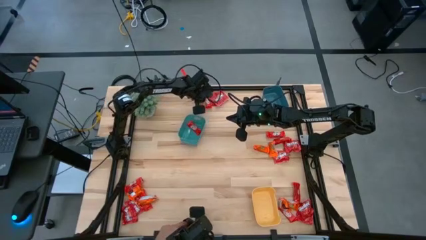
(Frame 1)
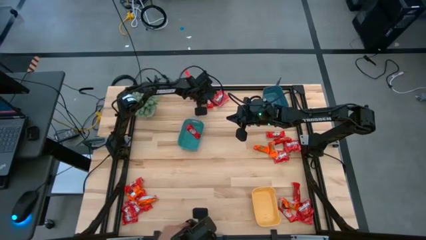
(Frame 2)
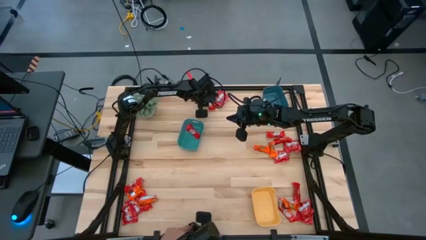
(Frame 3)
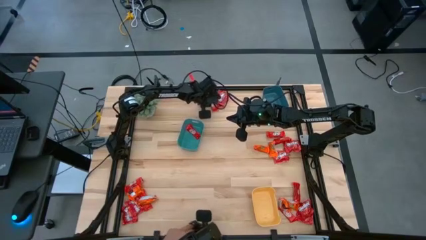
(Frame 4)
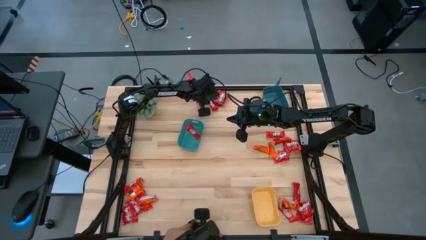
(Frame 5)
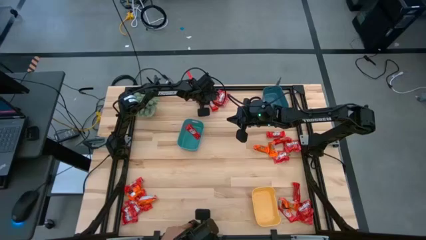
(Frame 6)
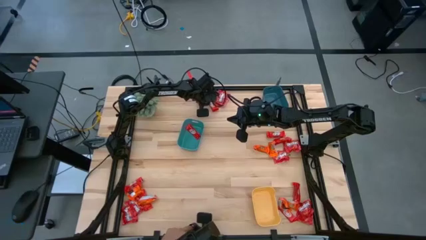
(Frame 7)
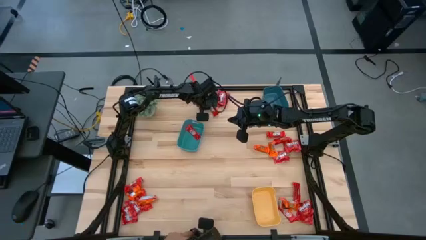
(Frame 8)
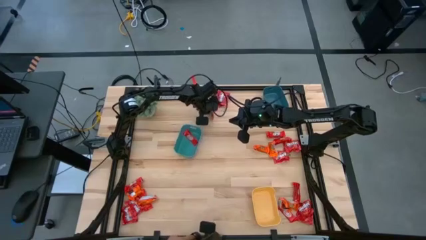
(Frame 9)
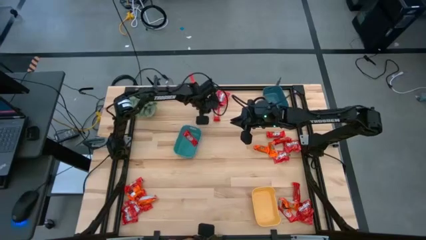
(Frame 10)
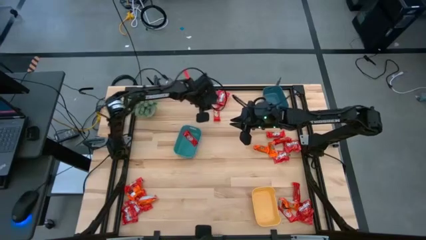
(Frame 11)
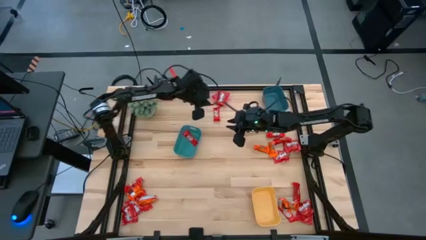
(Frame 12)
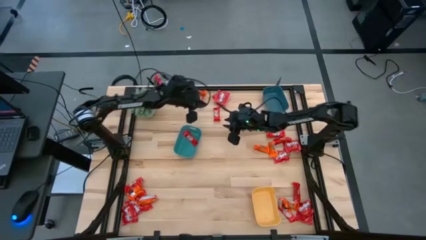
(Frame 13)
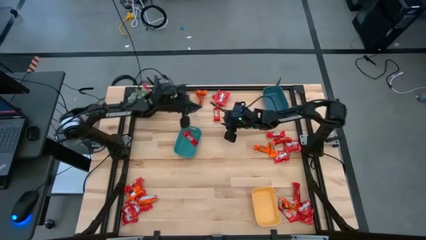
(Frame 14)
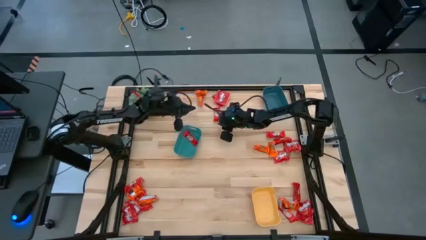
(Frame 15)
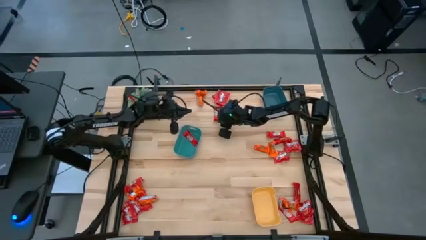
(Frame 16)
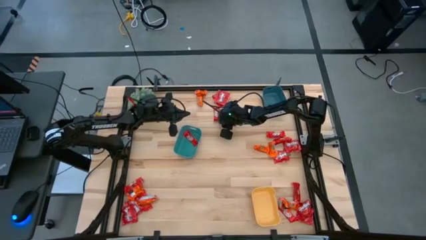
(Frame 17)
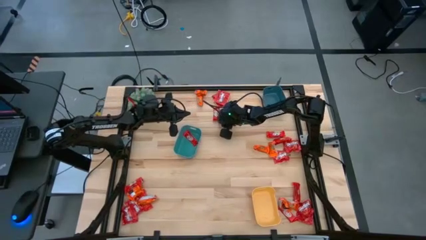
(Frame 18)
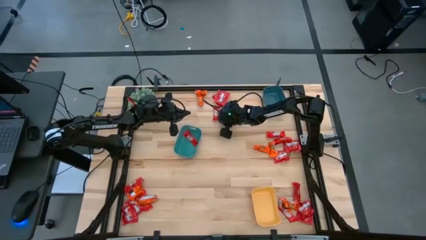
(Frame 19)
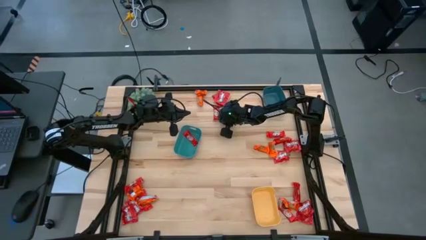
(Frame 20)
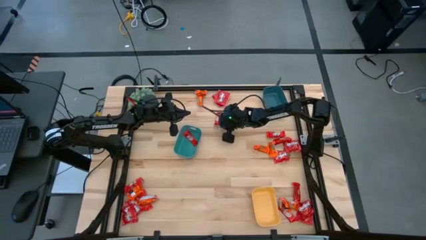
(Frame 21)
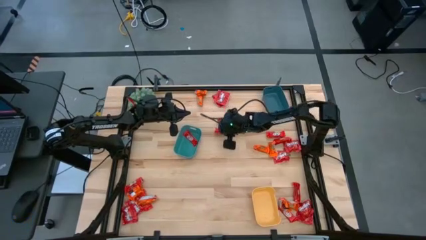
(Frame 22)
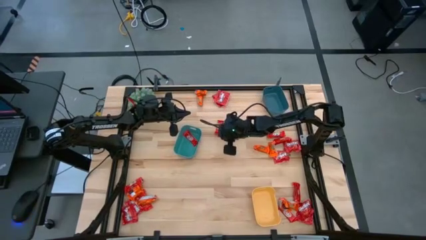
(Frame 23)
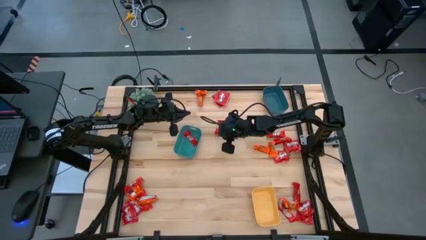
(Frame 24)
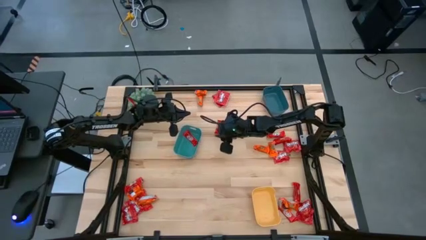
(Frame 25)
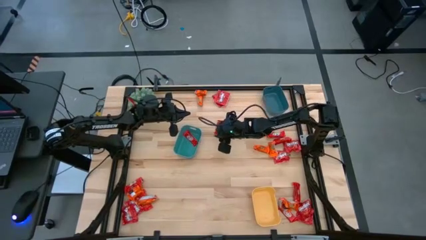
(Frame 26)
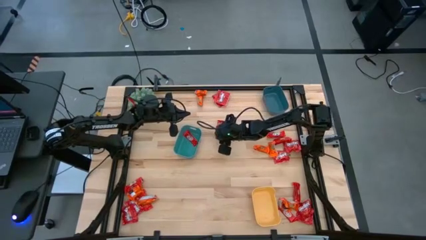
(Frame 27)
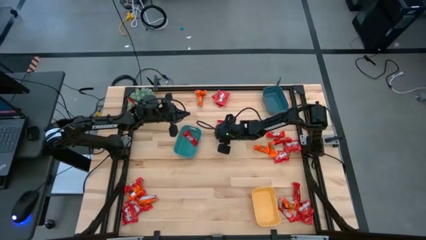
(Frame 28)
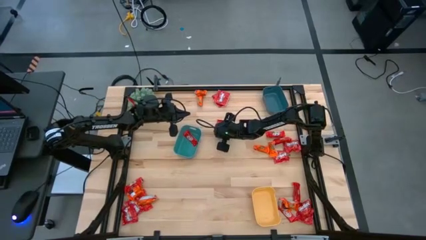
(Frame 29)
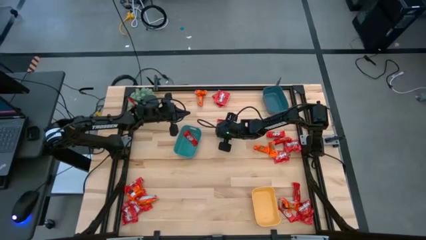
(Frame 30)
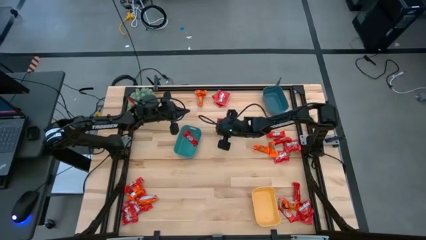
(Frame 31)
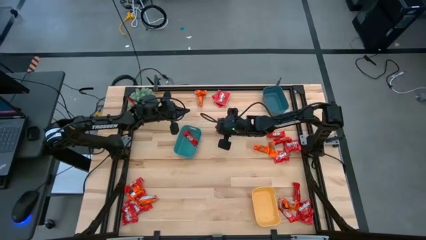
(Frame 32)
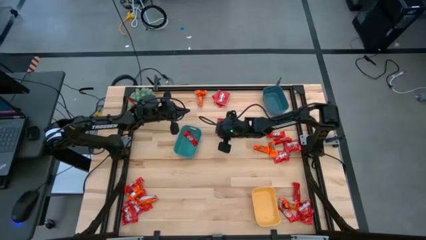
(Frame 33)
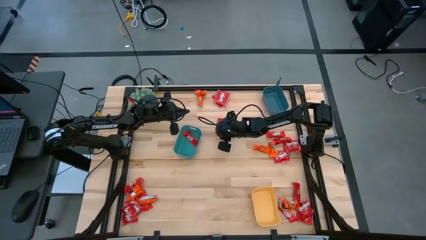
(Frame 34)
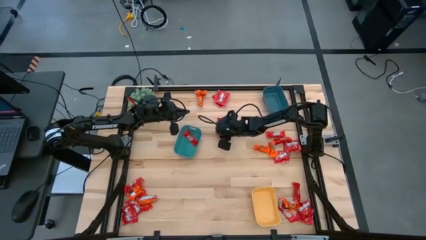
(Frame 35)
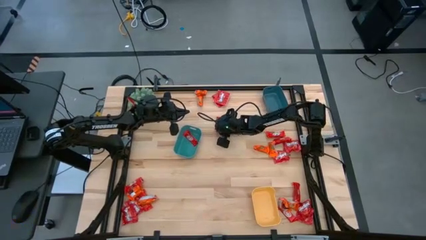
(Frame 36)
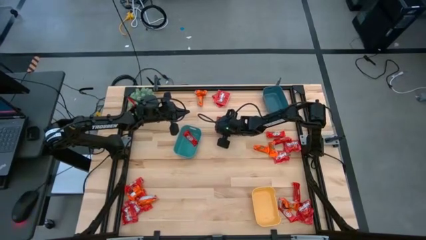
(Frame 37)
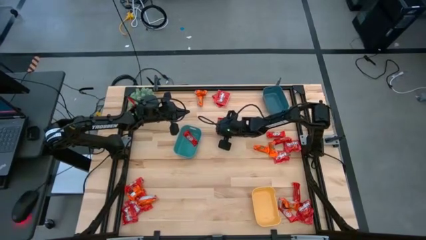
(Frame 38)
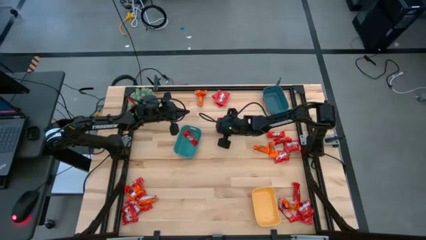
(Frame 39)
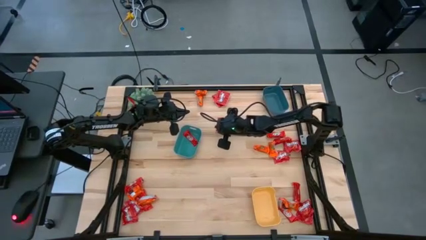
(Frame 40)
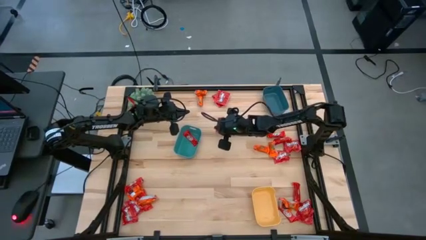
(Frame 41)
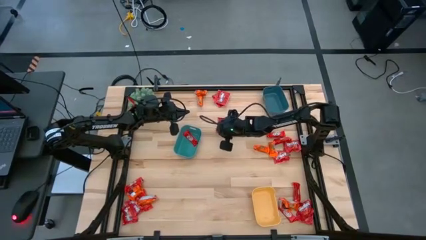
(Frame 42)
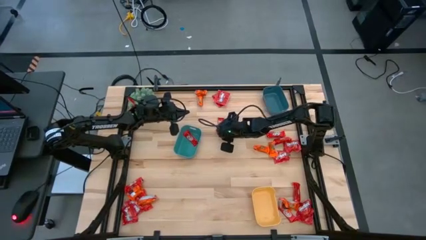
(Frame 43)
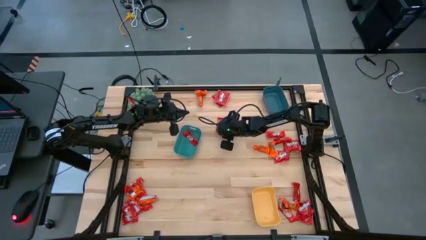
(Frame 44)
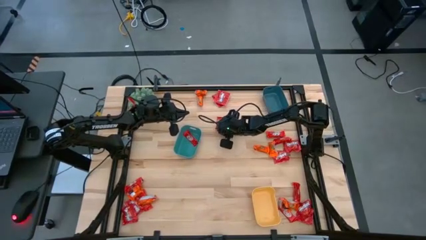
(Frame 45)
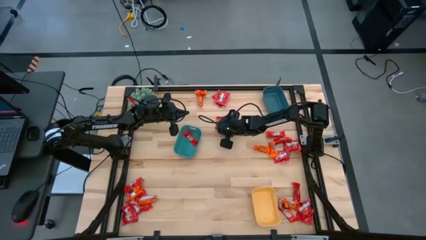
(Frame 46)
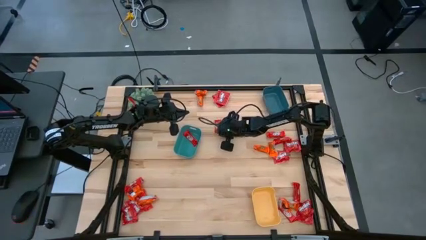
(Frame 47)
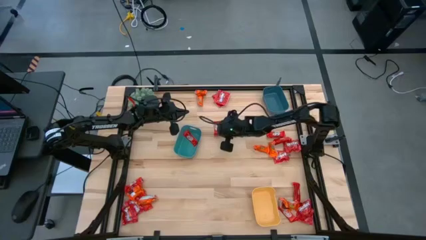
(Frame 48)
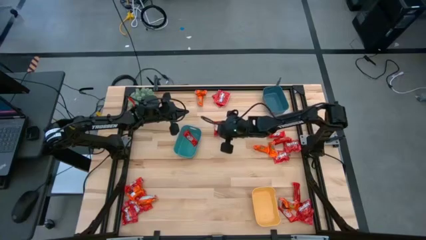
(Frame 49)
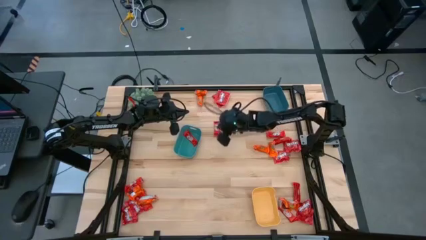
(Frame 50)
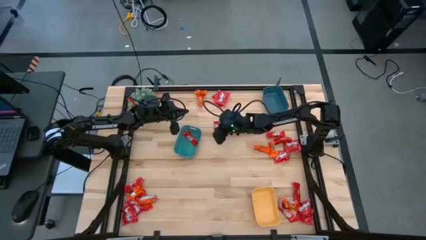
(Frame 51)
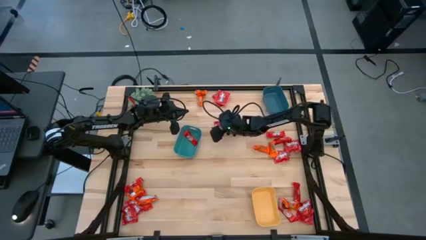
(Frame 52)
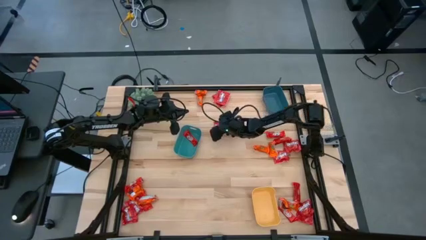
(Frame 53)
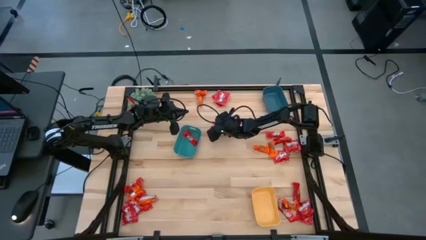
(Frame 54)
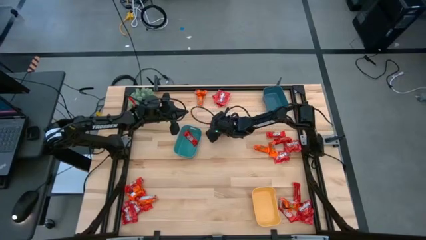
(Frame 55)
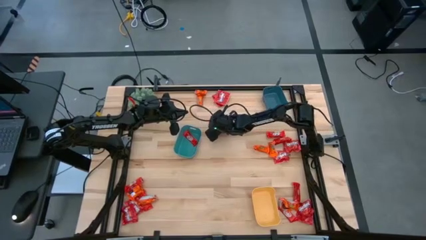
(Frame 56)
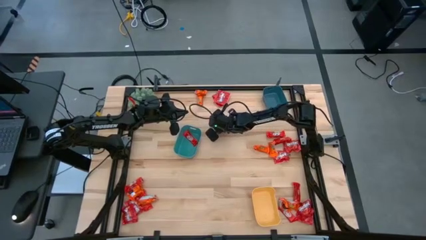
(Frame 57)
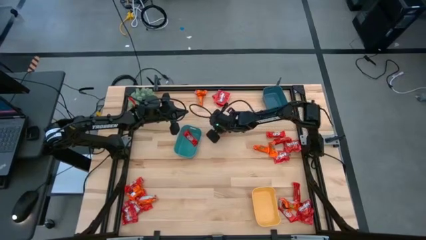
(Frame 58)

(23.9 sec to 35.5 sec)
Task: Sort candy
Put the small red candy into the green bin

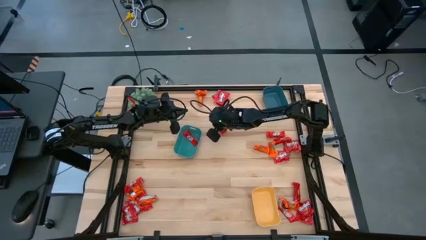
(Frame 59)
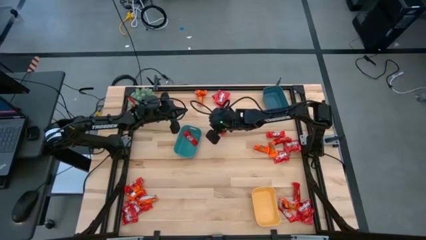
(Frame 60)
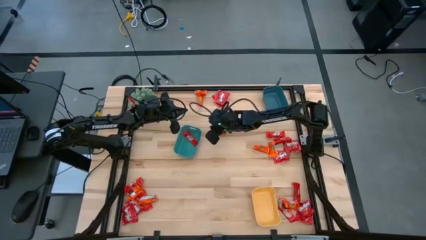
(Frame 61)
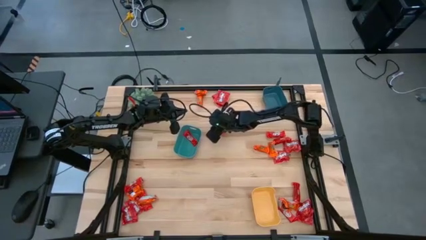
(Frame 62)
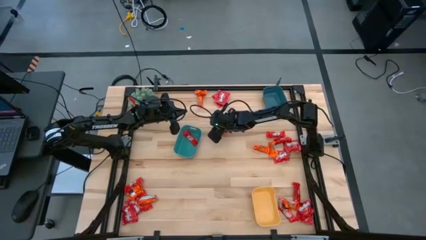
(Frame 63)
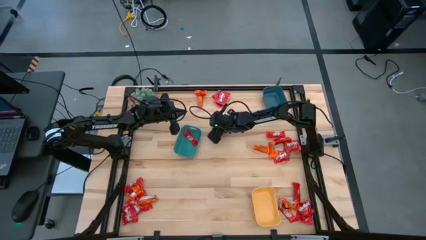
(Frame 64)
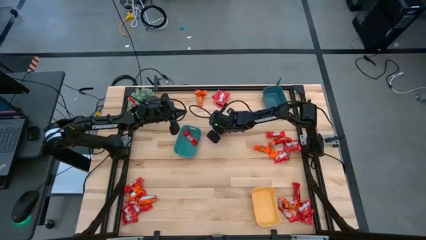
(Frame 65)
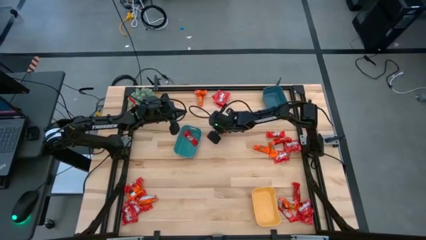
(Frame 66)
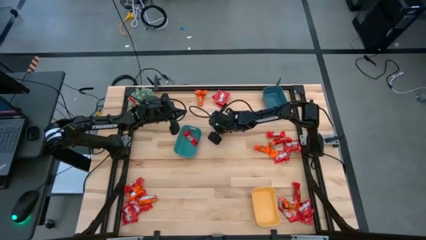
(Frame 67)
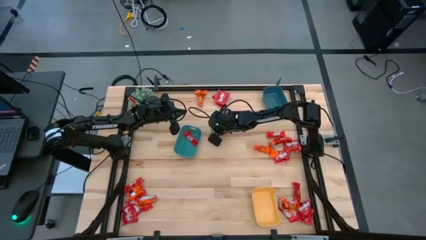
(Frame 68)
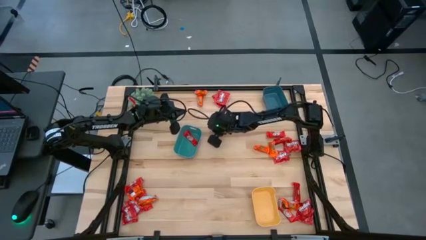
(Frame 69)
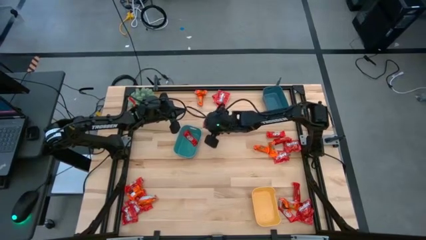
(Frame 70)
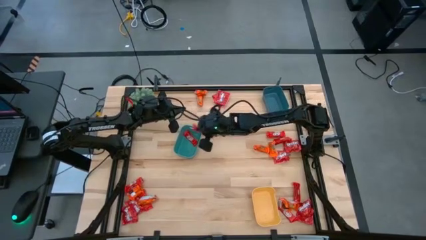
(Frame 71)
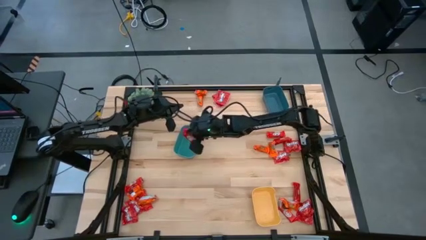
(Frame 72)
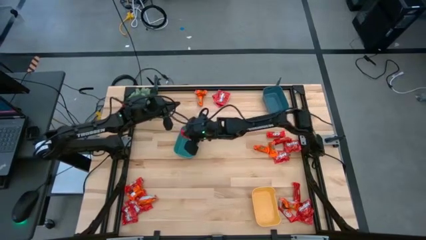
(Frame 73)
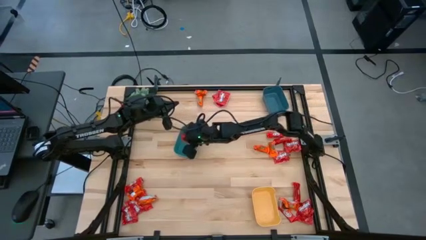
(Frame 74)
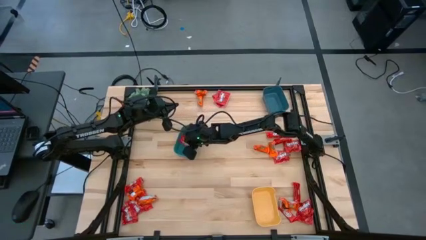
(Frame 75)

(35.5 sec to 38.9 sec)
Put the small red candy into the green bin

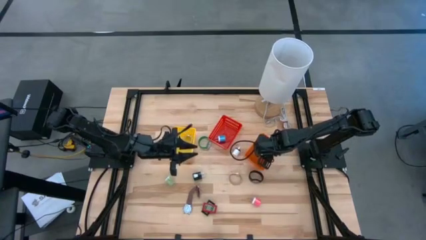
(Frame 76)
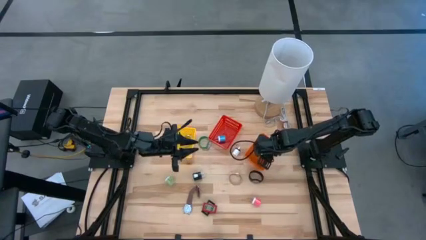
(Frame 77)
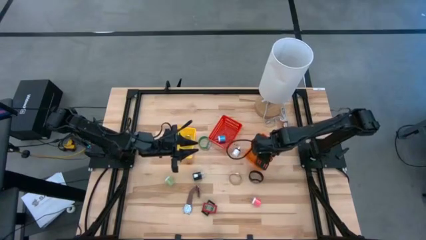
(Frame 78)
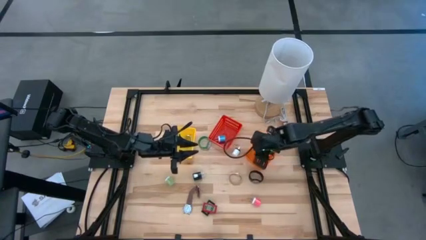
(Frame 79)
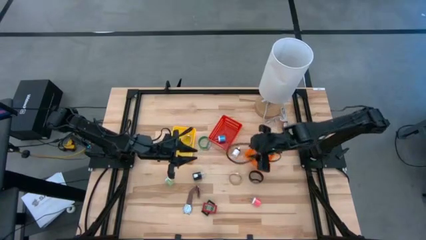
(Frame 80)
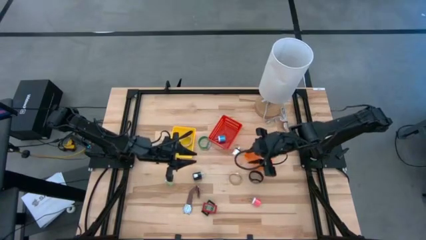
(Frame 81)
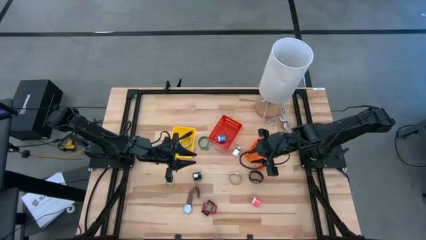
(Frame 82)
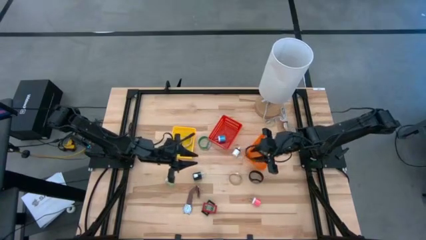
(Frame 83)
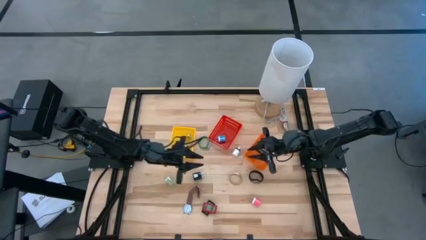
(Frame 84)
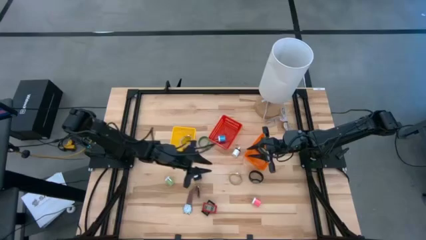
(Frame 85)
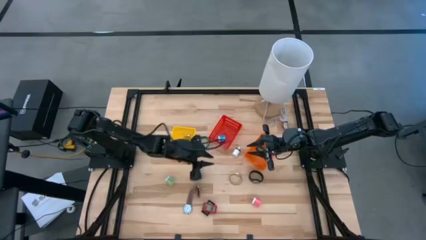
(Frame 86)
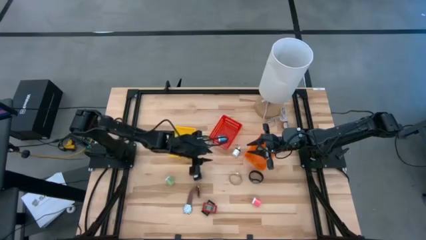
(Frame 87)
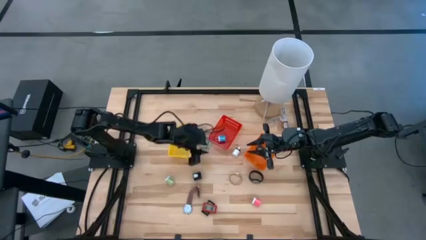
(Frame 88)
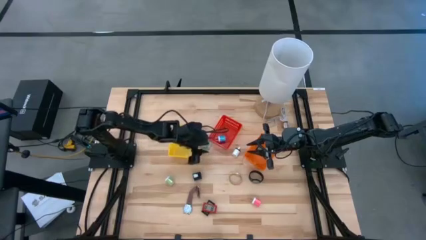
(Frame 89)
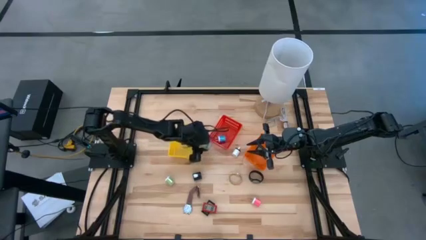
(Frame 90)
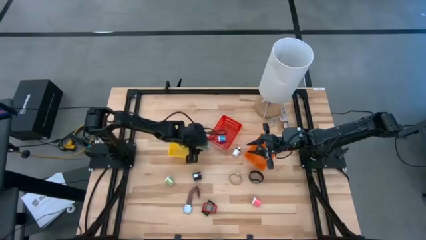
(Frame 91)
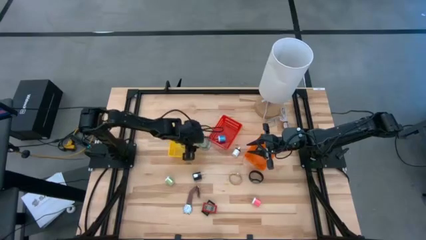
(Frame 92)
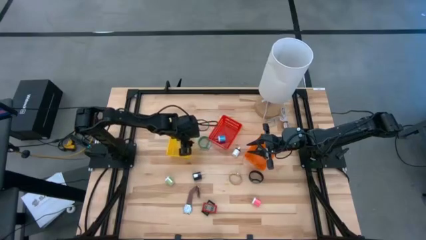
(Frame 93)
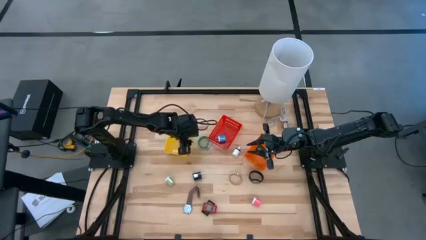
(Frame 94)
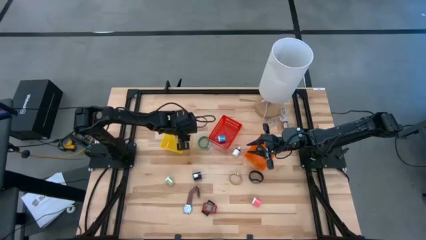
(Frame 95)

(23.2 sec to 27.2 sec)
Task: Pick & Place Office items
Adjust the yellow bin
